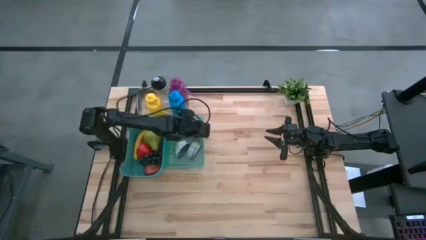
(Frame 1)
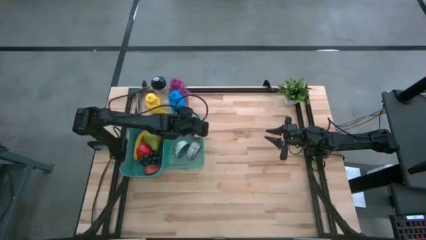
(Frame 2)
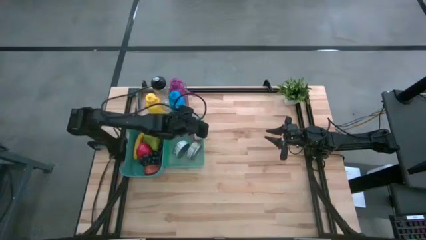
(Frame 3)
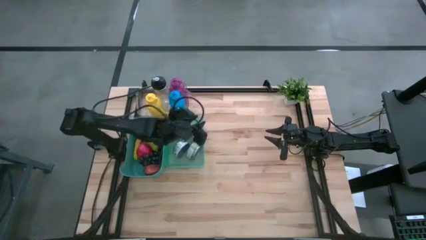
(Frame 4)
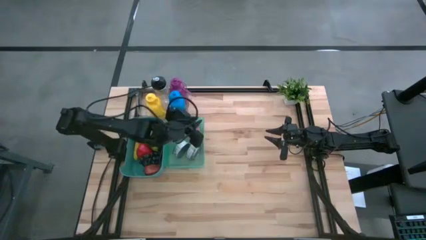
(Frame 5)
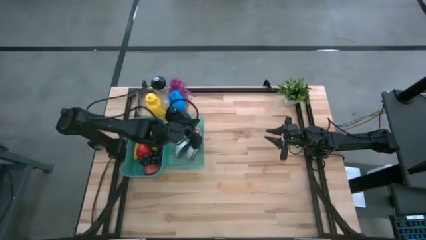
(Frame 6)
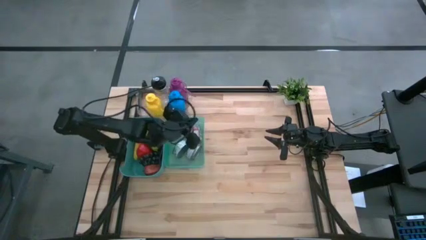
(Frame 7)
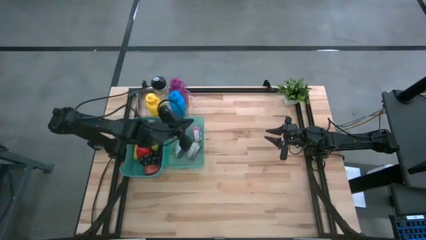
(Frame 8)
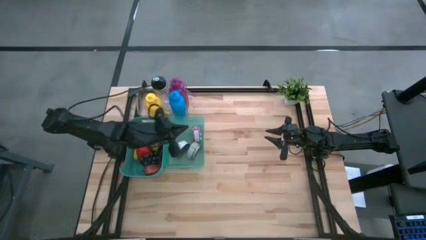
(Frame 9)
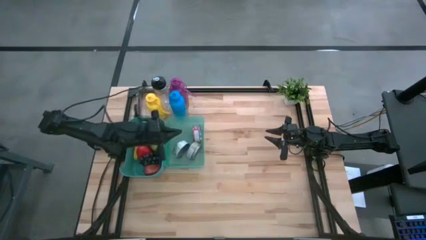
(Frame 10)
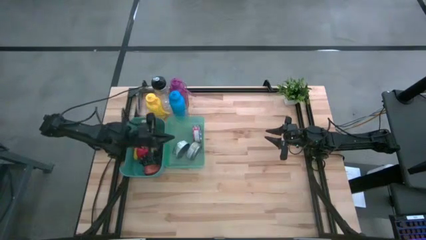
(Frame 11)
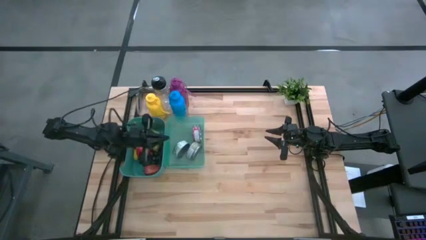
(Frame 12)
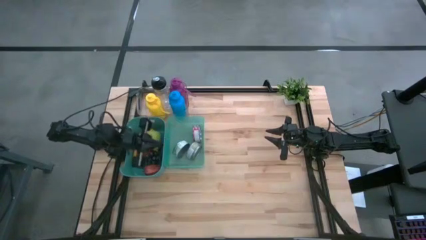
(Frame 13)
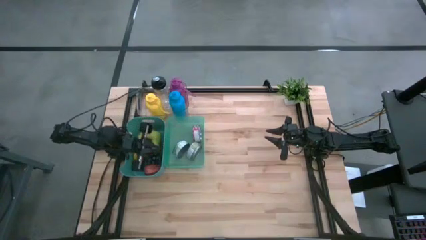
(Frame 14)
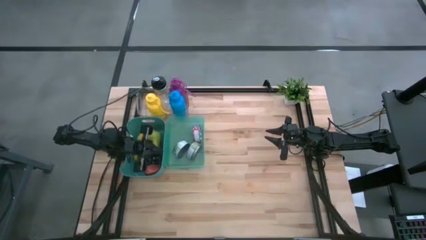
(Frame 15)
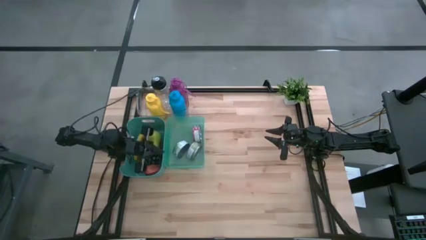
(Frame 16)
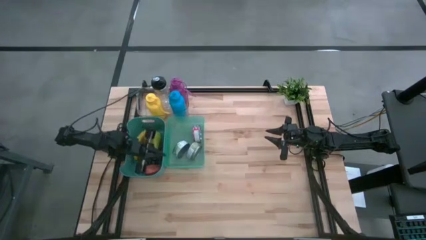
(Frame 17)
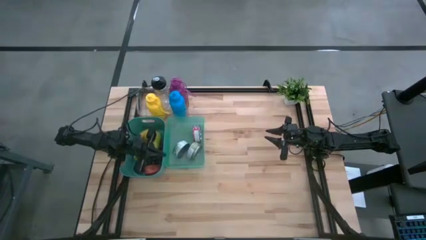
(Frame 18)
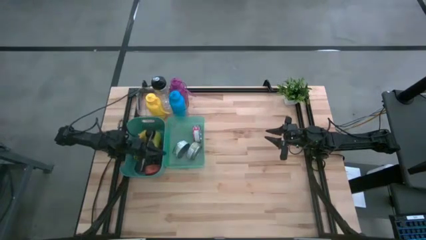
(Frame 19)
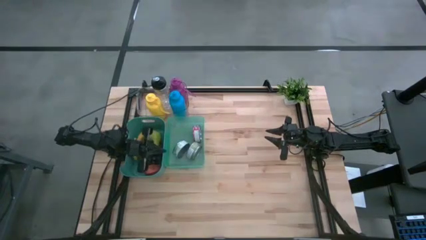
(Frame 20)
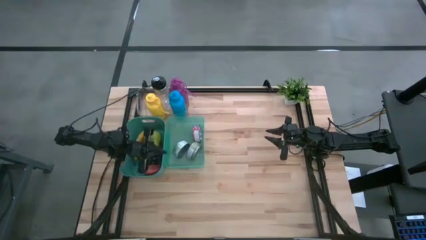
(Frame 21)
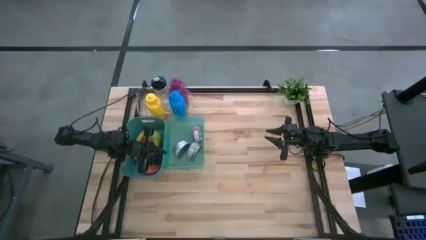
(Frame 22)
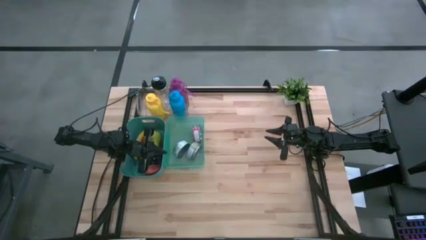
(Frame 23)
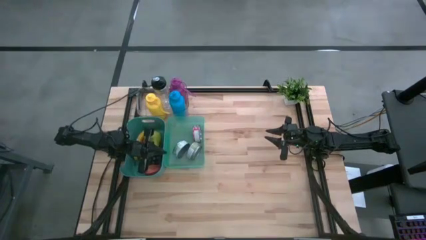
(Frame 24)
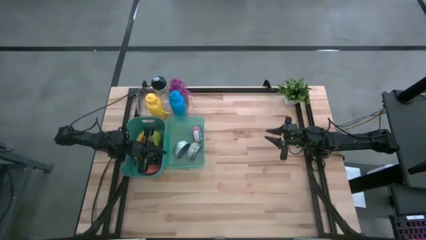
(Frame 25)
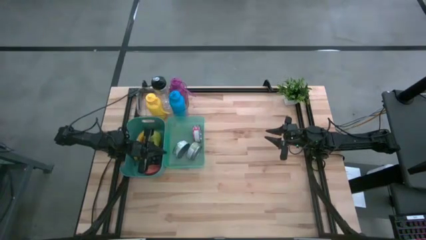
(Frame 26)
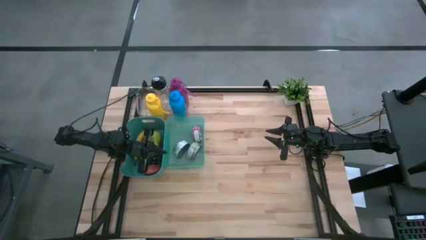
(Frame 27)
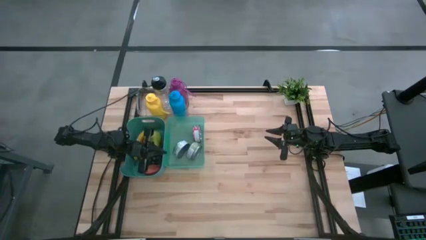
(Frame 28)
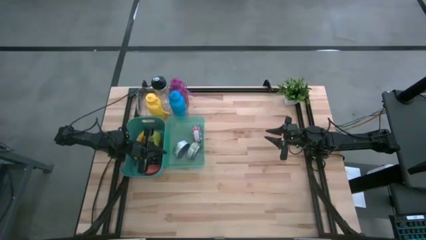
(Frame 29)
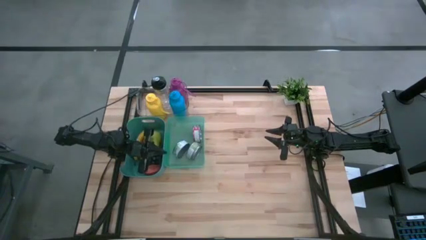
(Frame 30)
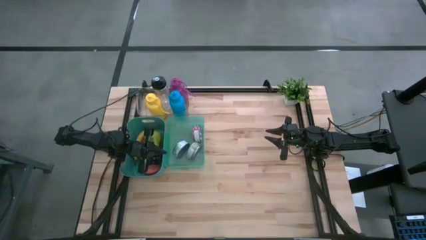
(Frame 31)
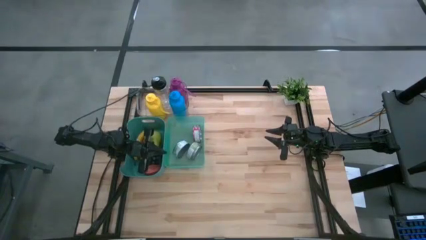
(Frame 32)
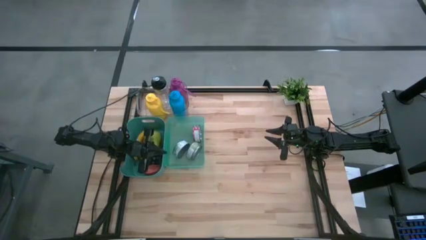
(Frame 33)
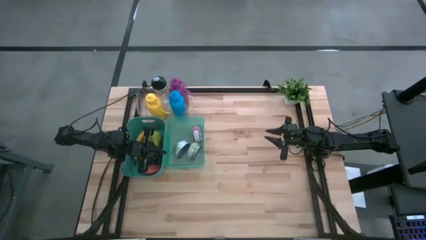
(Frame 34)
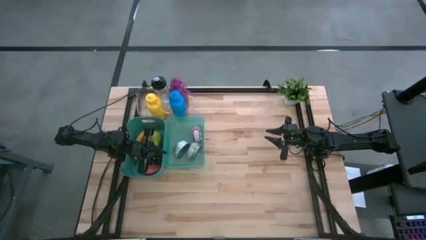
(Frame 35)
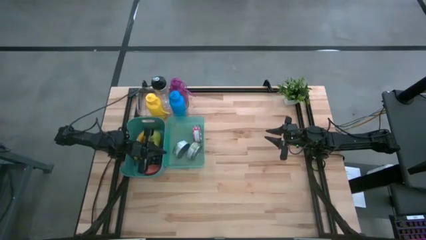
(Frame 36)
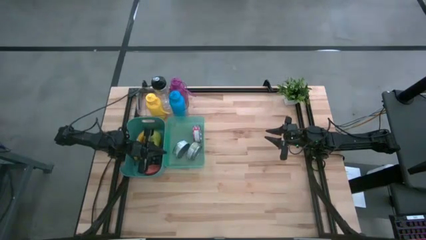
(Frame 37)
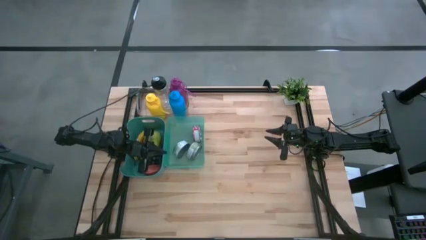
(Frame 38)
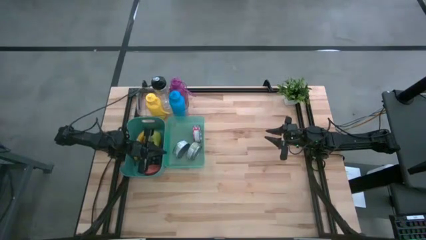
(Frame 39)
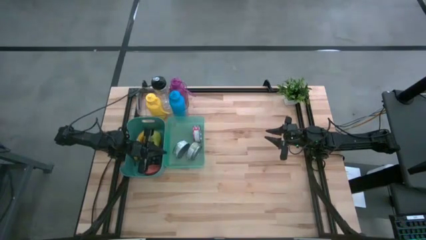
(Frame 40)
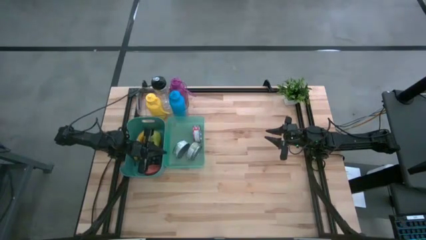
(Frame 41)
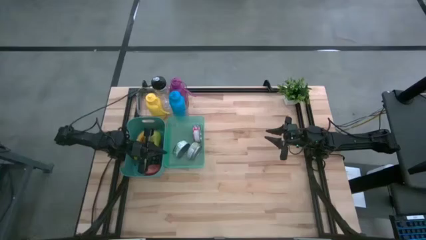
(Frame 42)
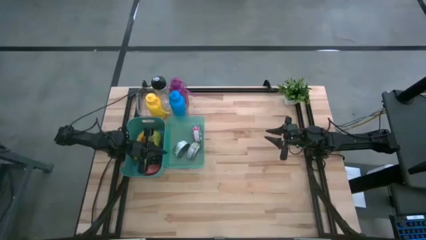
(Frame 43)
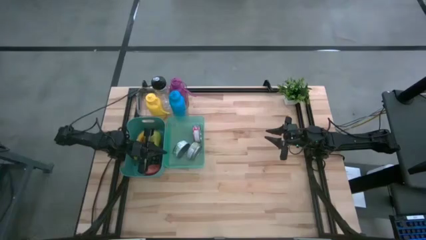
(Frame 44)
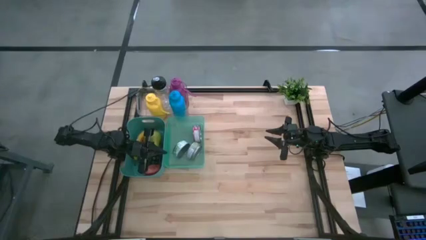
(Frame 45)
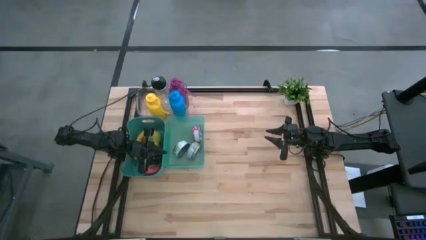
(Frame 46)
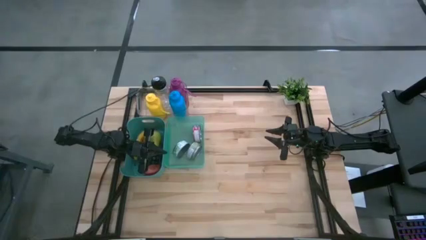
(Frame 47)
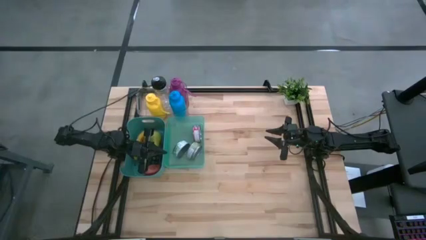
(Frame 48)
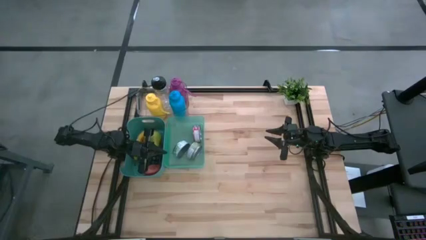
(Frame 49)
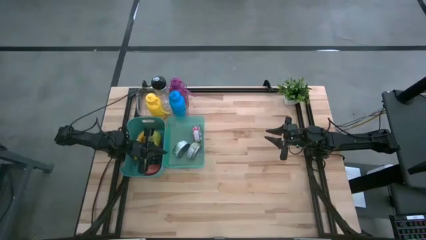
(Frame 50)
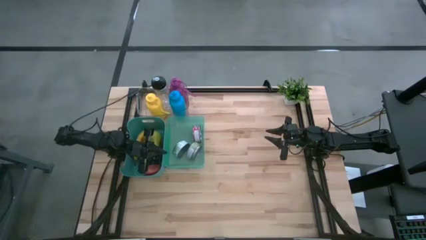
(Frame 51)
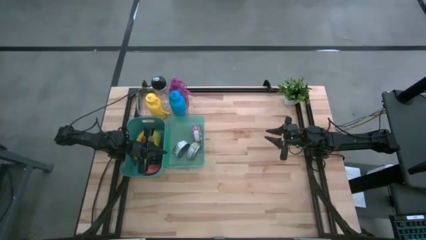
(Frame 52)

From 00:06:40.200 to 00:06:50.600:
Task: Pick & Place Food Item
Return to Home Position
